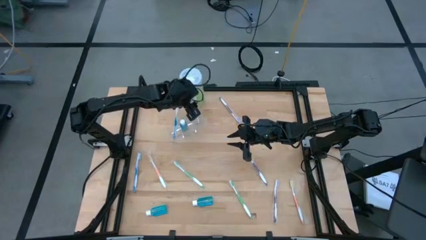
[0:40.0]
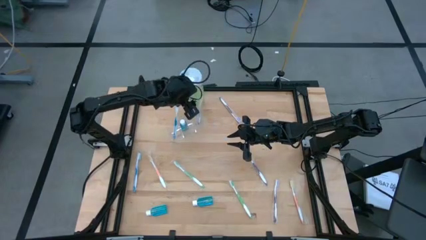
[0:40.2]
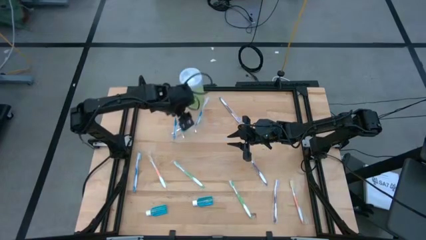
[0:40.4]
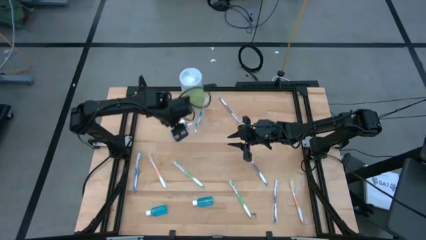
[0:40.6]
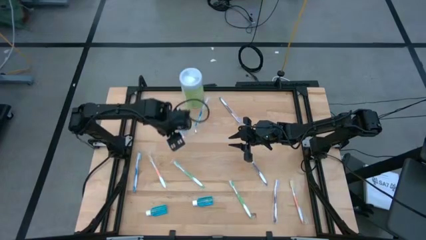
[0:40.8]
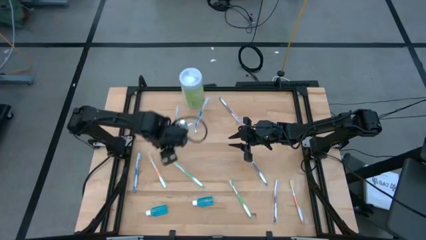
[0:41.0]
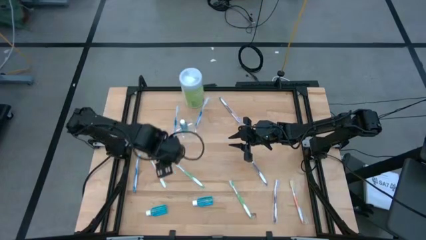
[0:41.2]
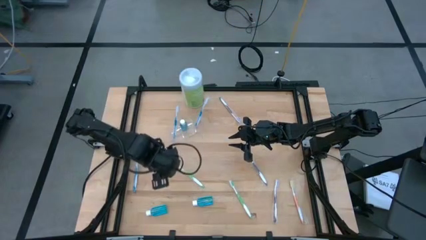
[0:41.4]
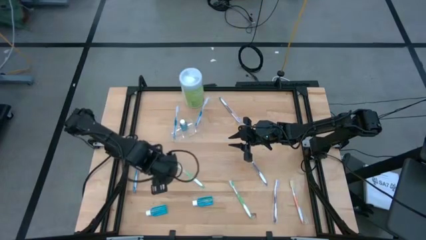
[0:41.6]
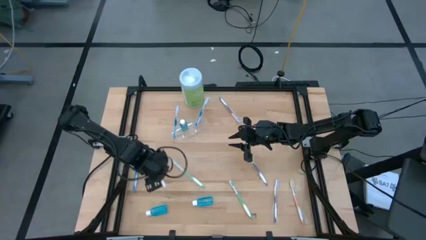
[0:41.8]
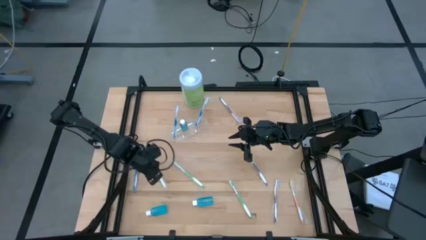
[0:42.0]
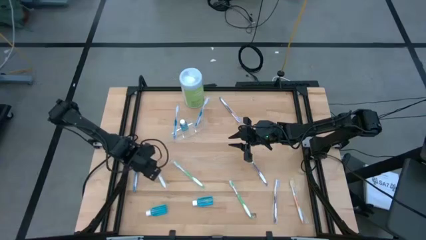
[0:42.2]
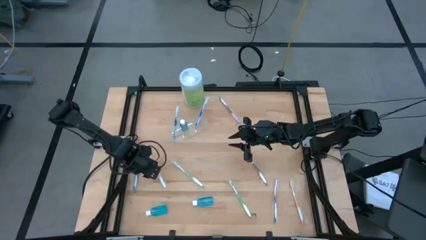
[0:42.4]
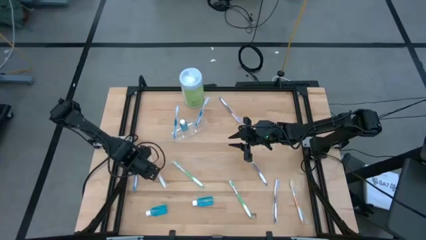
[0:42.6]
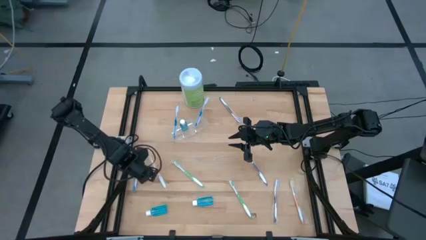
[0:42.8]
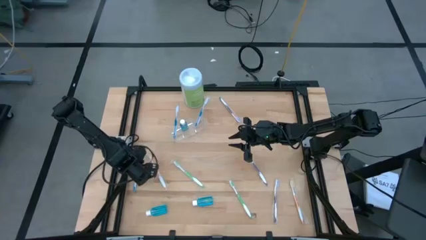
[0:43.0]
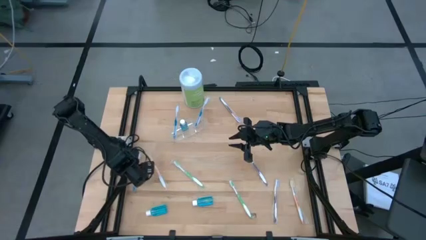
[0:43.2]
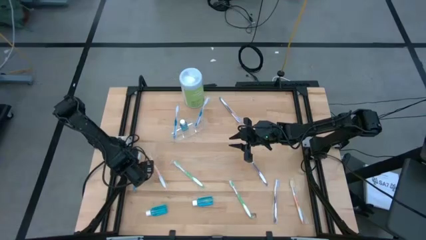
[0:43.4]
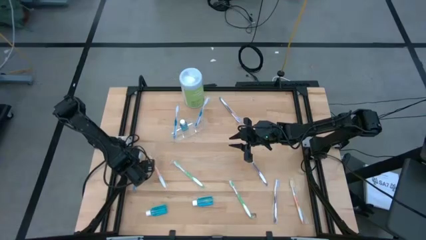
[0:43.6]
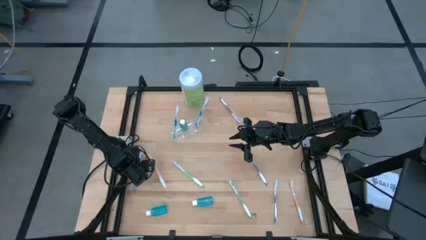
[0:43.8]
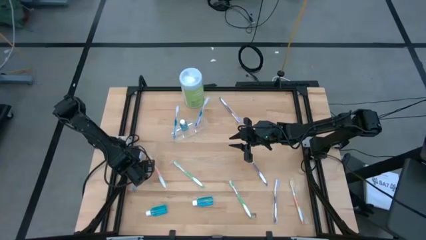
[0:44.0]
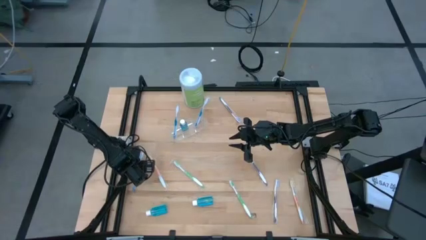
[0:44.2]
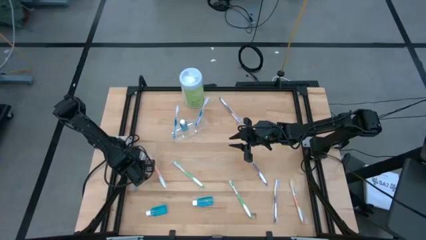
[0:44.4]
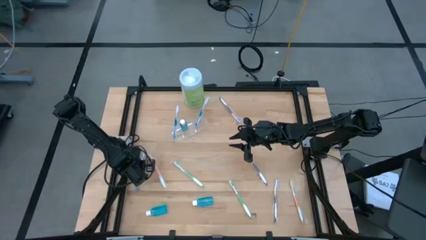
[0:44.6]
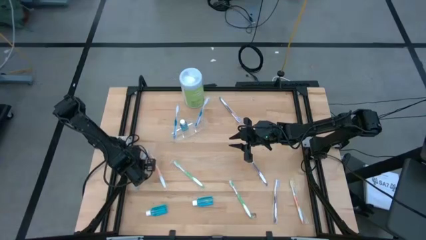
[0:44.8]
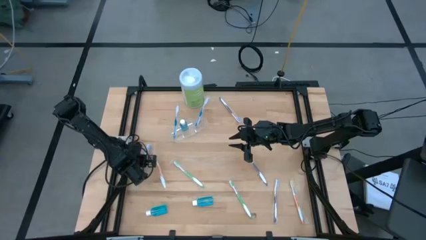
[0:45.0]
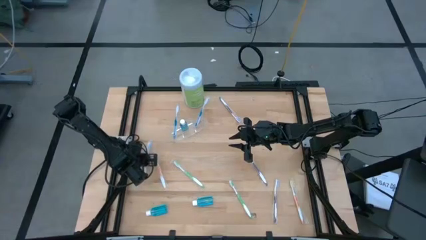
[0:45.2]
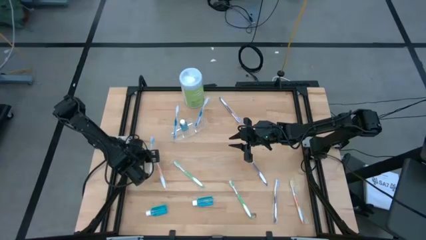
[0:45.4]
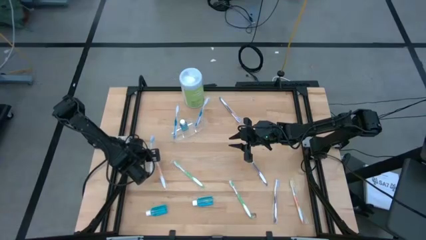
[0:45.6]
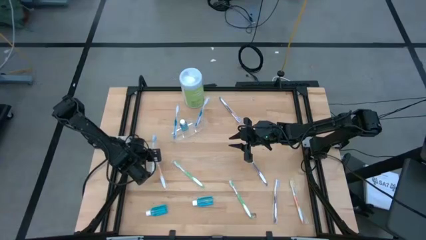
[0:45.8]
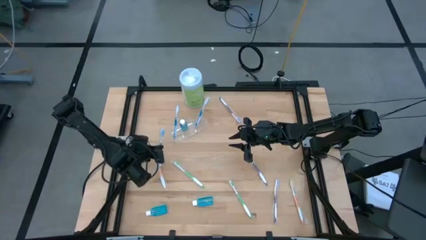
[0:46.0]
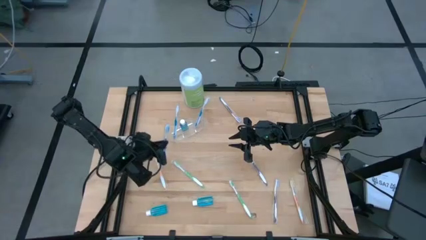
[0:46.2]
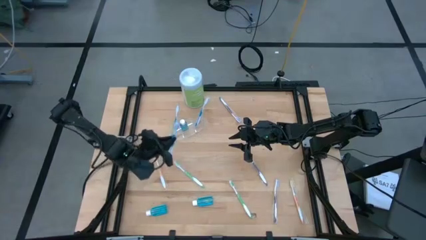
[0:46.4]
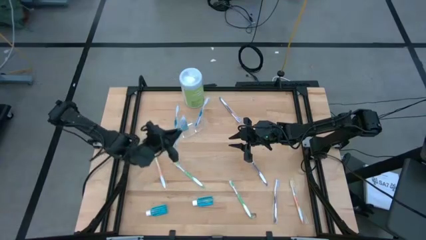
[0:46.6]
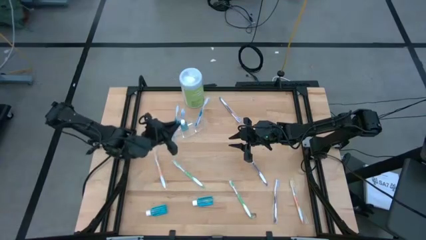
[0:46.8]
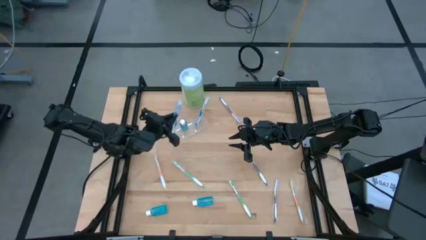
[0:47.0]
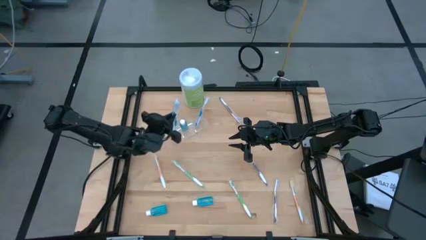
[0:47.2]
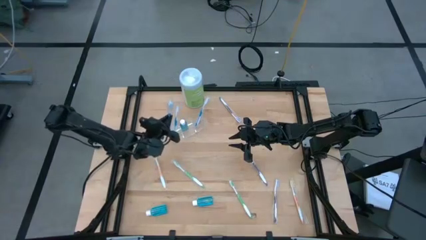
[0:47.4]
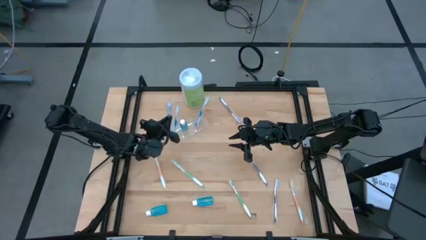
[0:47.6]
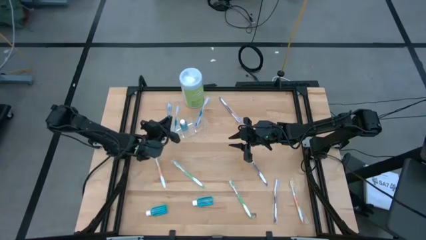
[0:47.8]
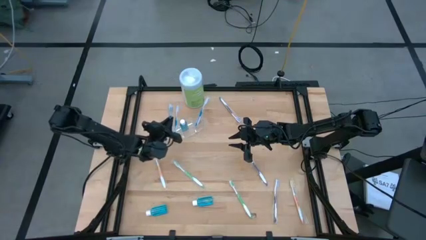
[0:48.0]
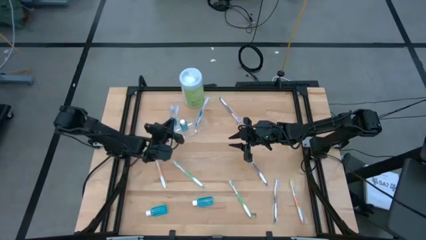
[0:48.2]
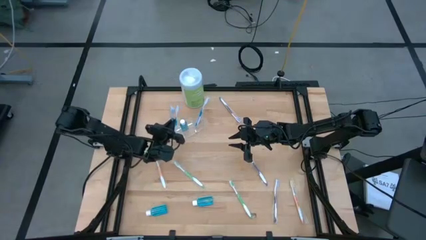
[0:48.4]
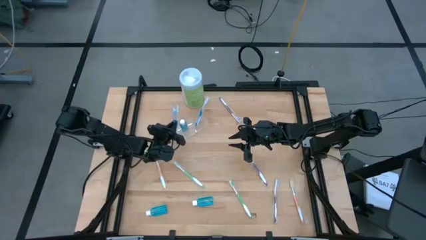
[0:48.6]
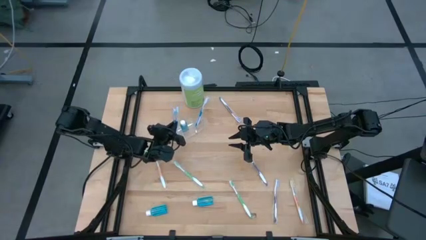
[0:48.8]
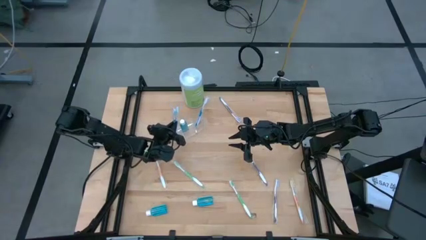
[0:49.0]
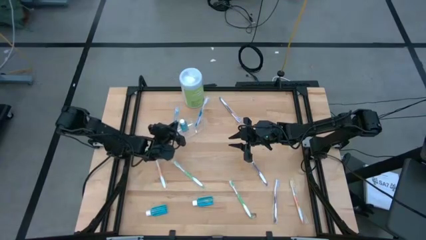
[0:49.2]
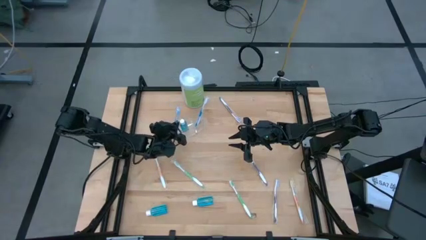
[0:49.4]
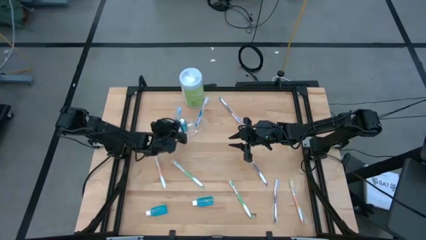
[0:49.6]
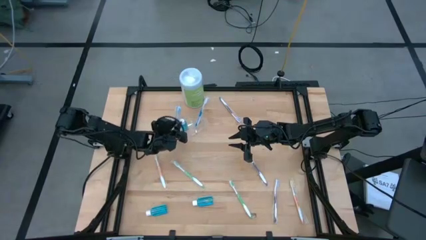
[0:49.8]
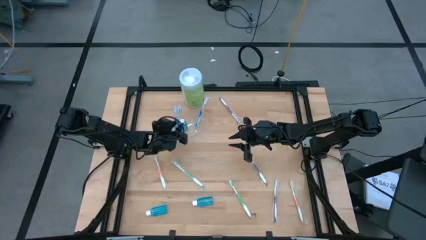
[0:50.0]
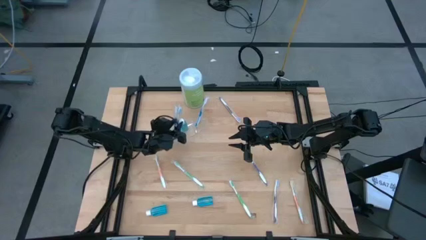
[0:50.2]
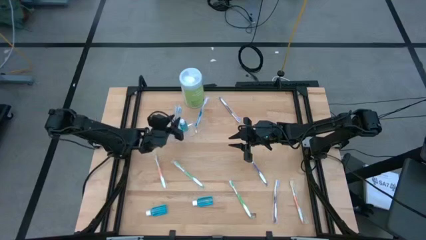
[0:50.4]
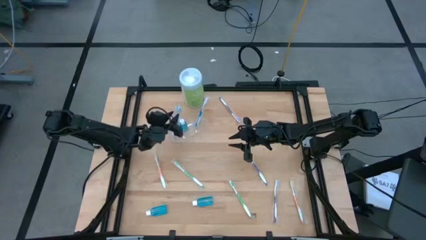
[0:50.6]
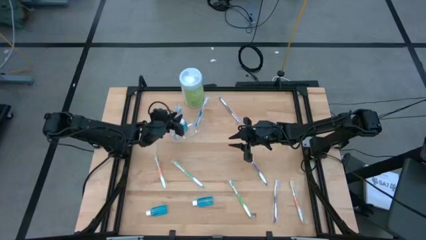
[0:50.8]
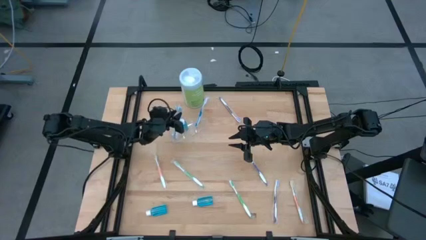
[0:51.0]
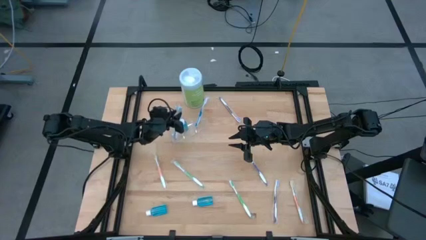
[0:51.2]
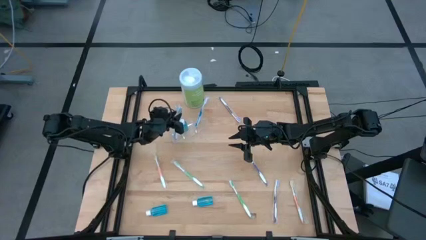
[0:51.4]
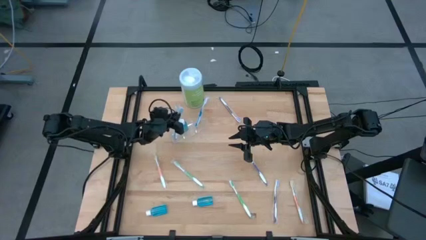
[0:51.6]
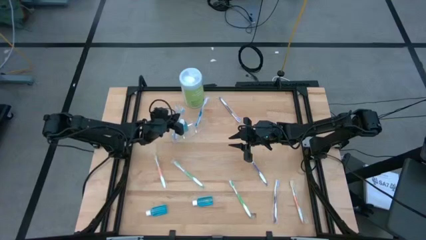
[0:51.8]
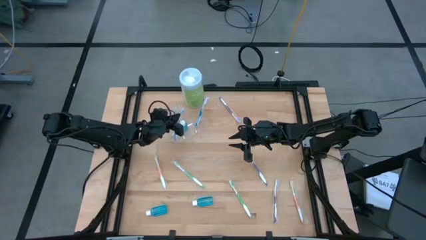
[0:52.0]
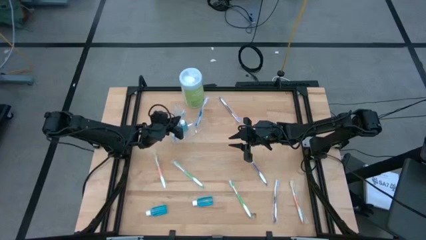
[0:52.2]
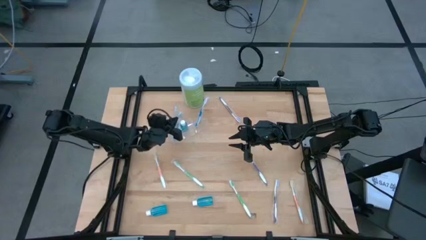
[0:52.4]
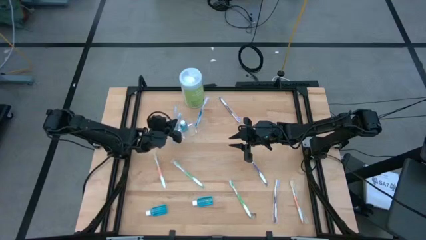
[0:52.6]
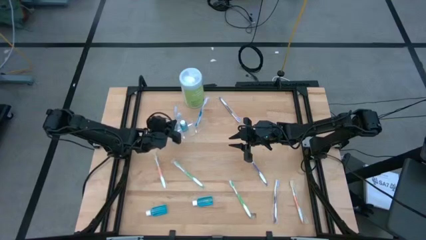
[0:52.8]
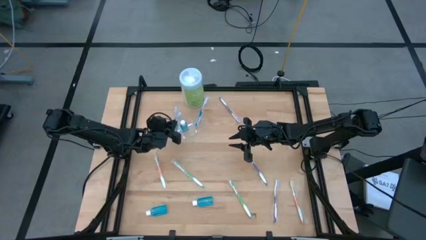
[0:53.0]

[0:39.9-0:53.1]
Task: Pick & Place toothbrushing station
Put the blue toothbrush into the transparent organizer

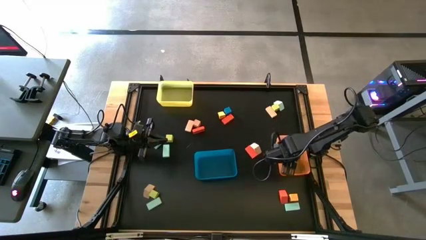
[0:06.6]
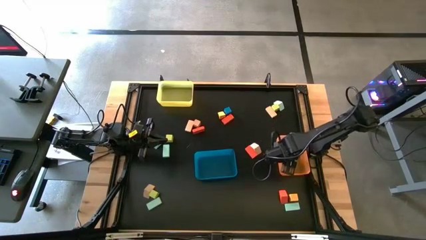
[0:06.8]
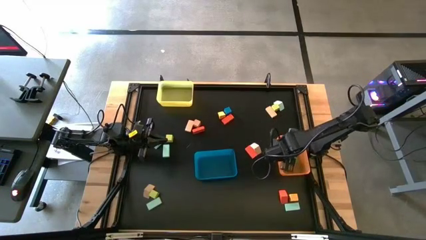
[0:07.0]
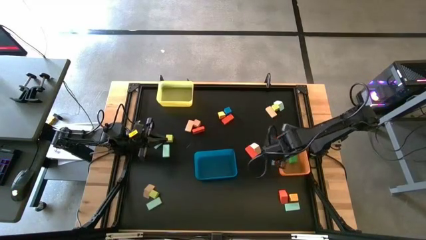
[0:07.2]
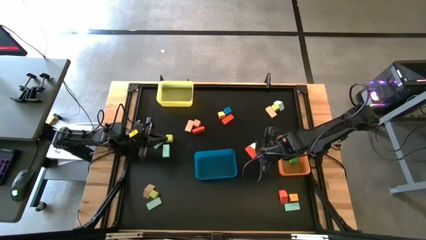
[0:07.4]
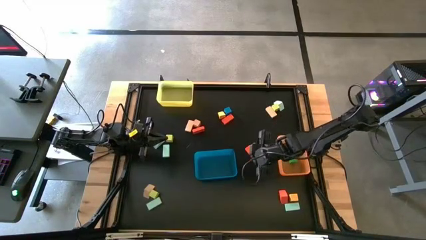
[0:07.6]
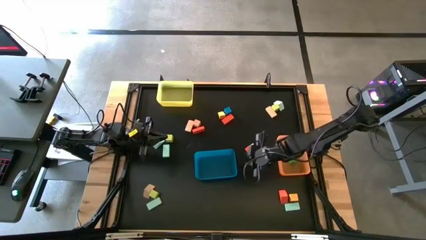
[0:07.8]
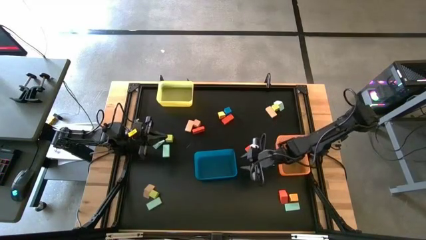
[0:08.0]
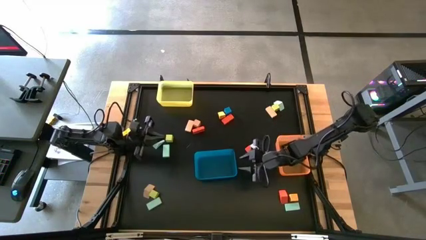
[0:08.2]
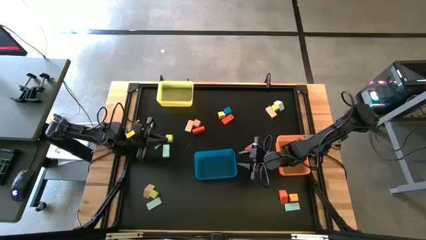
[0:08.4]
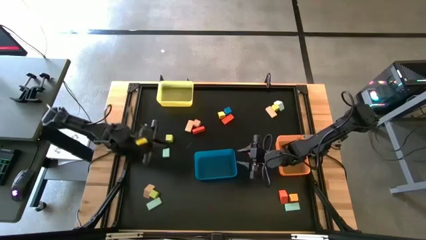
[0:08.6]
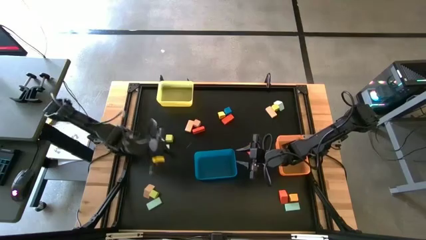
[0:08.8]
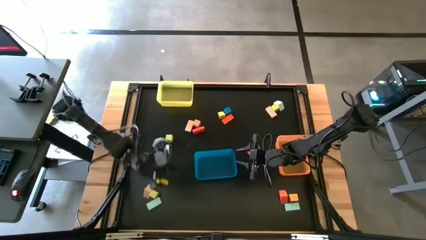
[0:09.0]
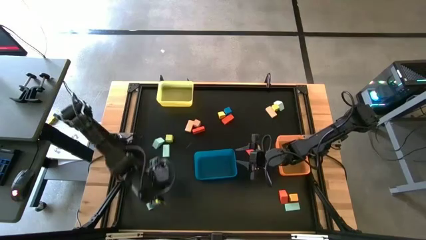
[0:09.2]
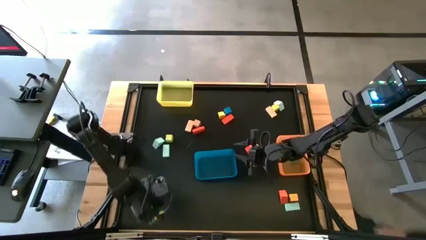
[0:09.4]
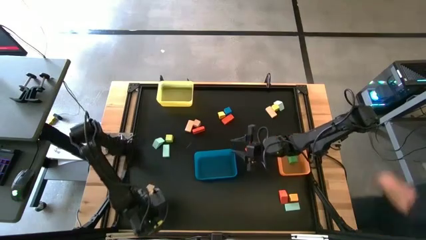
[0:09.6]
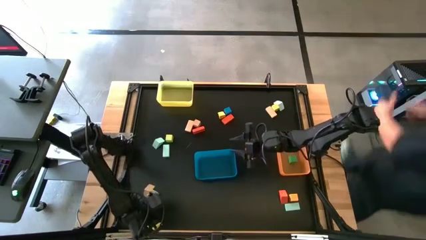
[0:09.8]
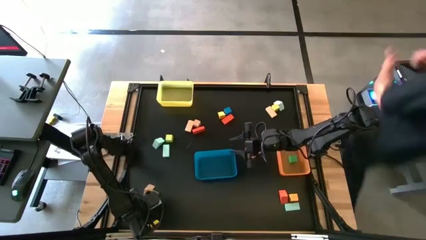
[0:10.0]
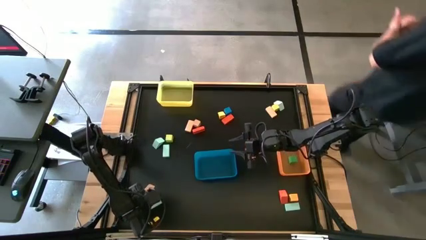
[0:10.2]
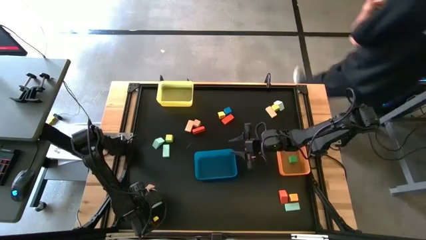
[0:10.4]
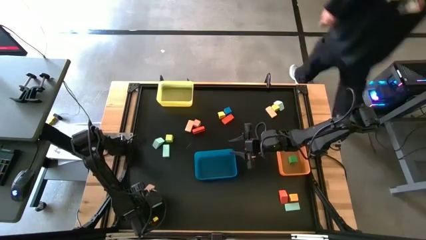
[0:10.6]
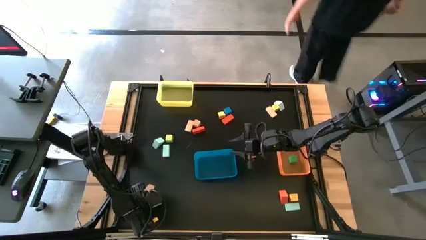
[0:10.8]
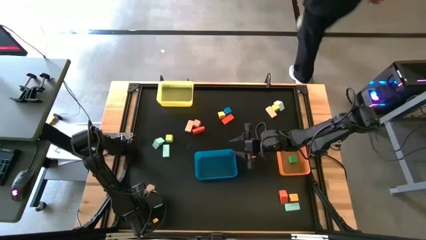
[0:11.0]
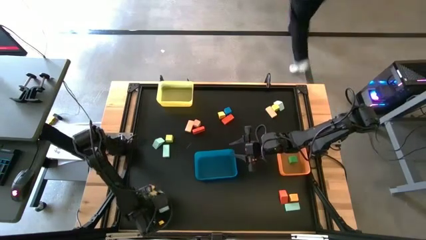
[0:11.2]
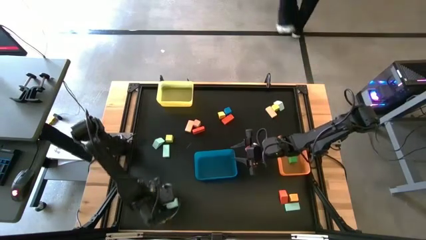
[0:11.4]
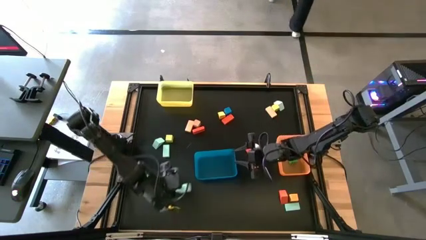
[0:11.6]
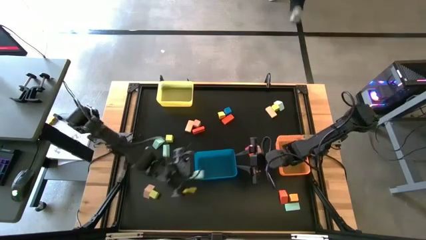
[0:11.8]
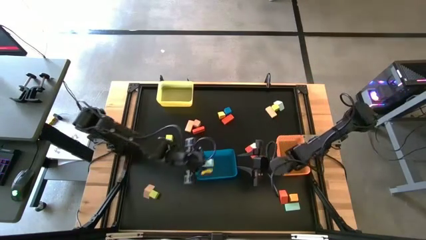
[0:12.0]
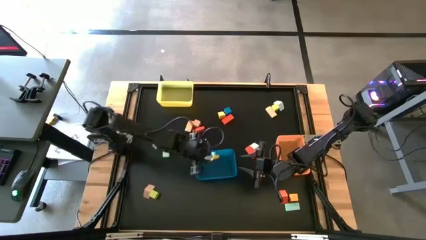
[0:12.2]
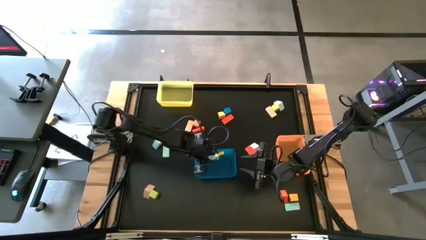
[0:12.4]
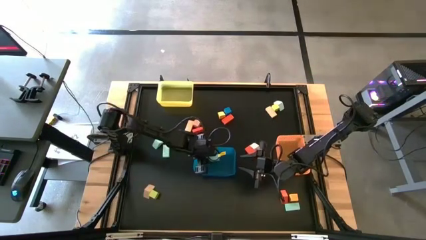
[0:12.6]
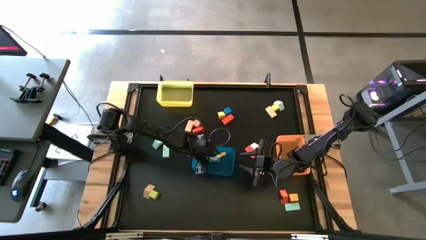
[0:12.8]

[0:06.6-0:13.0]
Task: Sort blocks by size
Put the light blue rectangular block into the blue bin
